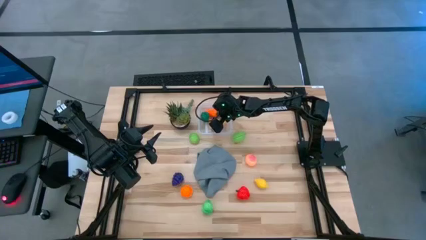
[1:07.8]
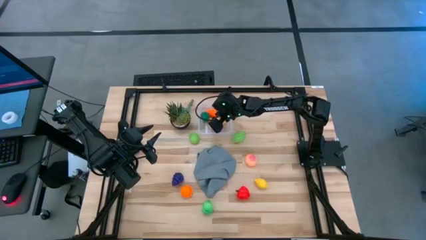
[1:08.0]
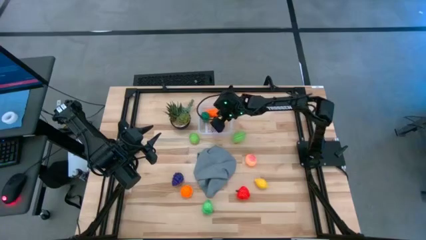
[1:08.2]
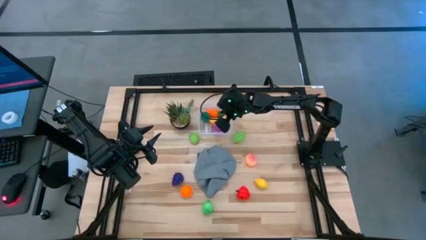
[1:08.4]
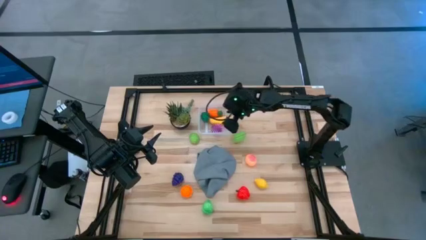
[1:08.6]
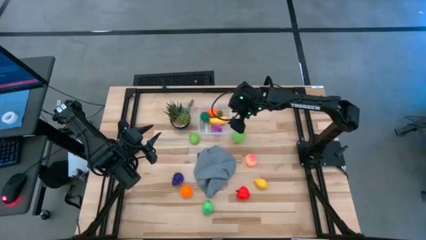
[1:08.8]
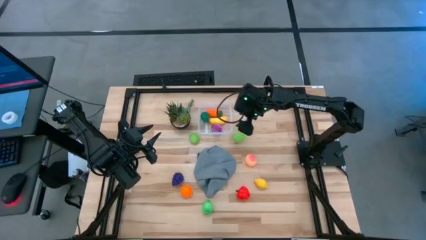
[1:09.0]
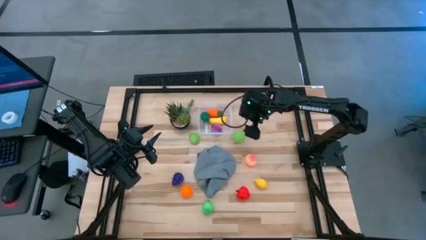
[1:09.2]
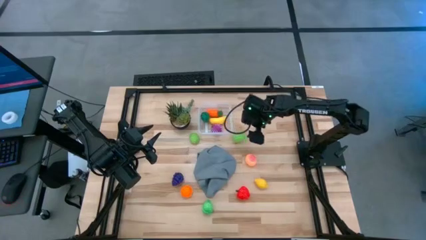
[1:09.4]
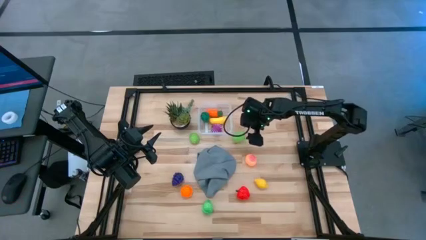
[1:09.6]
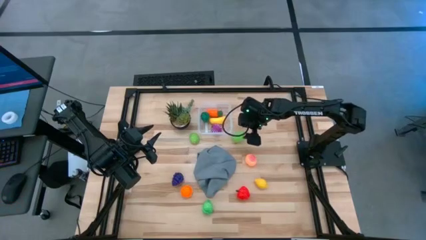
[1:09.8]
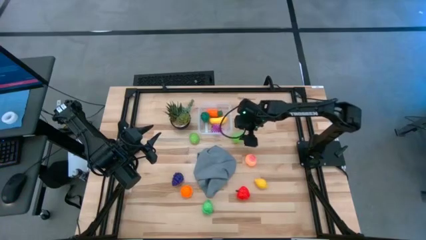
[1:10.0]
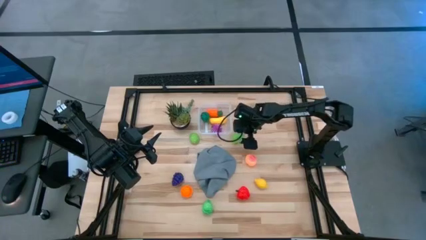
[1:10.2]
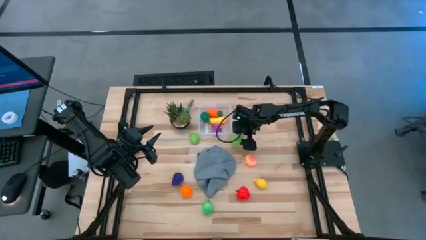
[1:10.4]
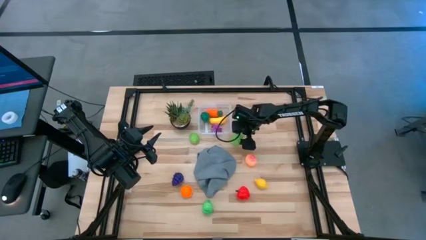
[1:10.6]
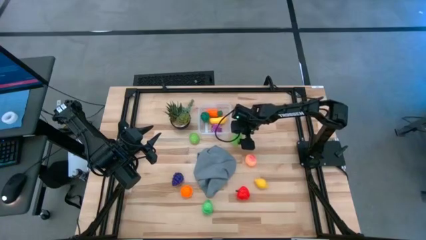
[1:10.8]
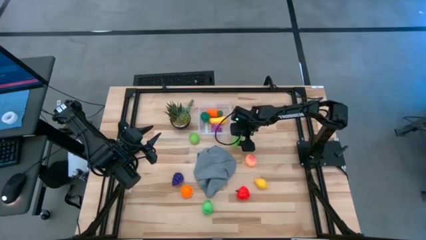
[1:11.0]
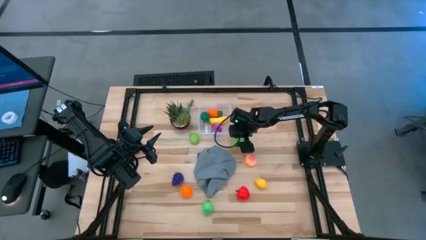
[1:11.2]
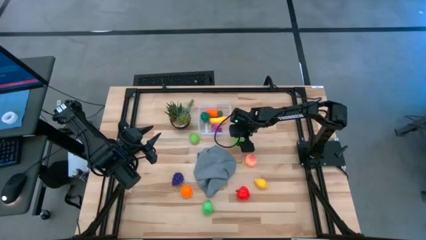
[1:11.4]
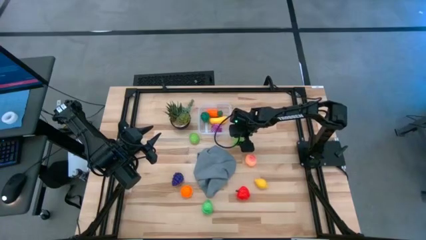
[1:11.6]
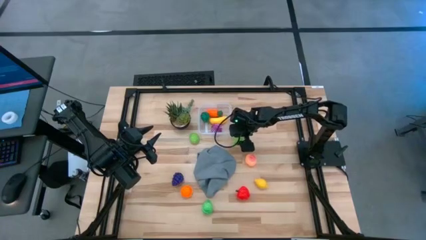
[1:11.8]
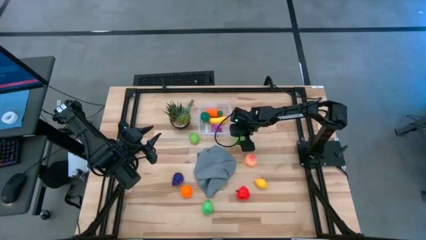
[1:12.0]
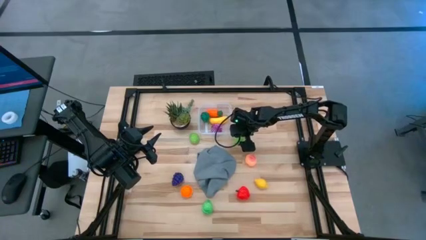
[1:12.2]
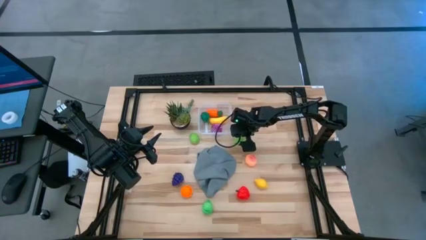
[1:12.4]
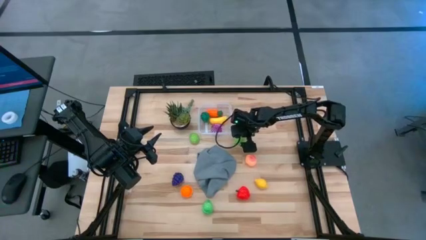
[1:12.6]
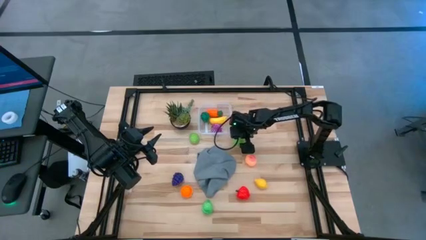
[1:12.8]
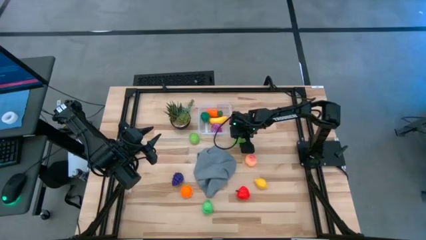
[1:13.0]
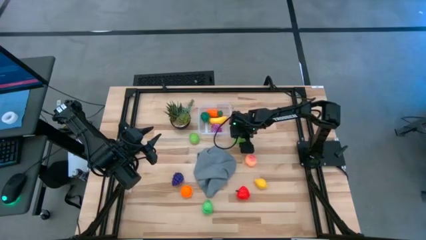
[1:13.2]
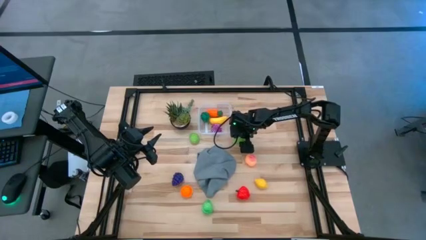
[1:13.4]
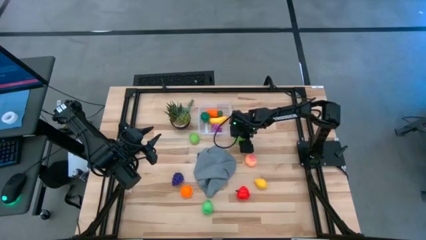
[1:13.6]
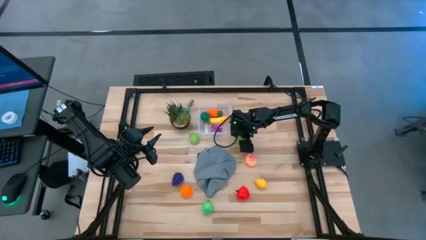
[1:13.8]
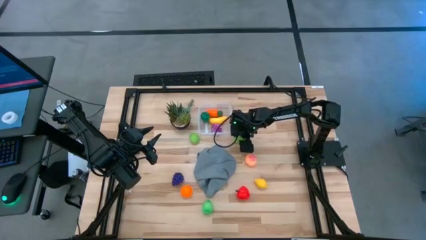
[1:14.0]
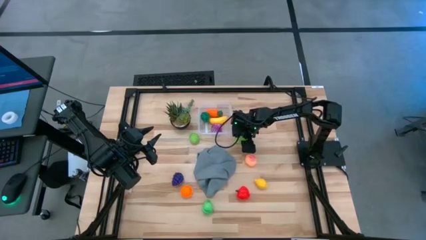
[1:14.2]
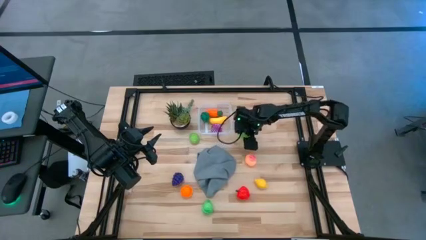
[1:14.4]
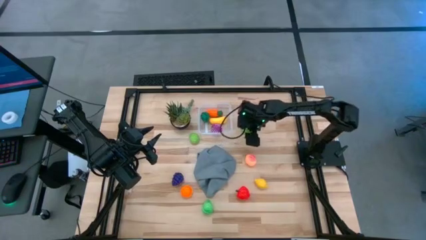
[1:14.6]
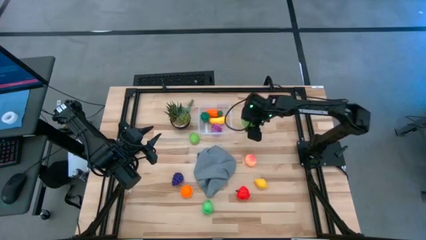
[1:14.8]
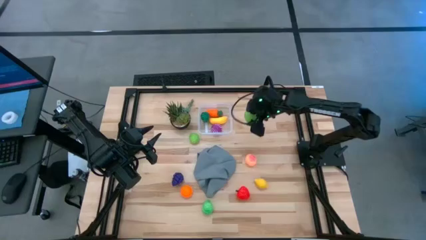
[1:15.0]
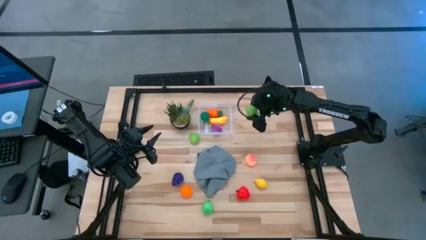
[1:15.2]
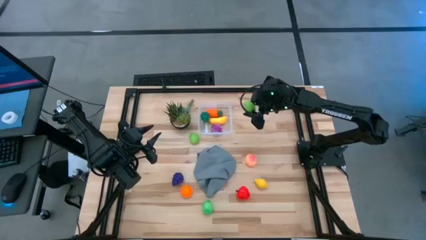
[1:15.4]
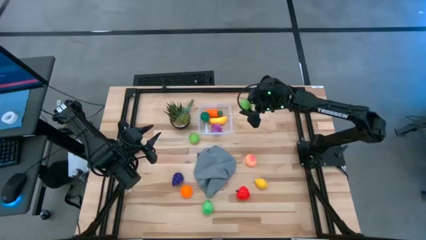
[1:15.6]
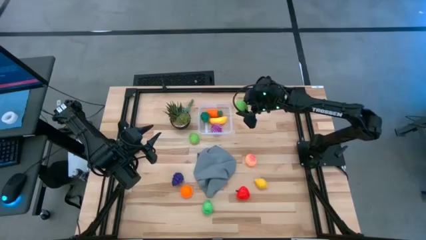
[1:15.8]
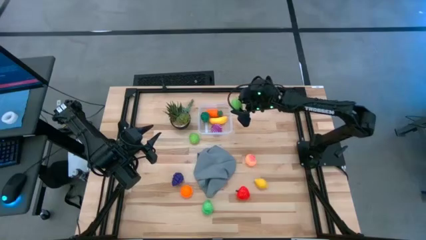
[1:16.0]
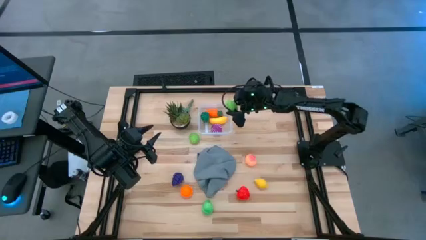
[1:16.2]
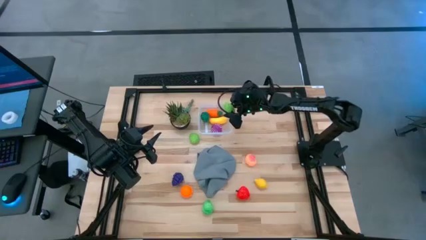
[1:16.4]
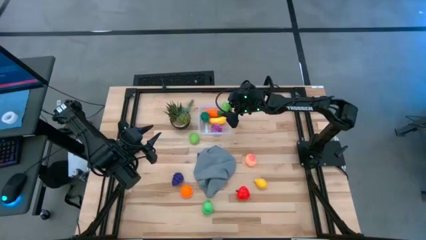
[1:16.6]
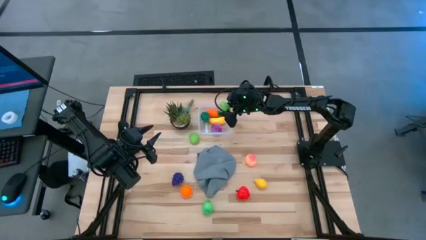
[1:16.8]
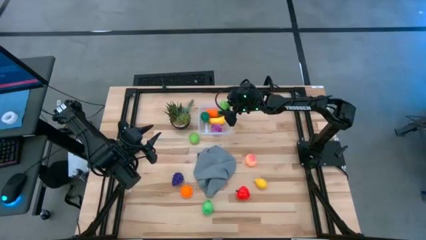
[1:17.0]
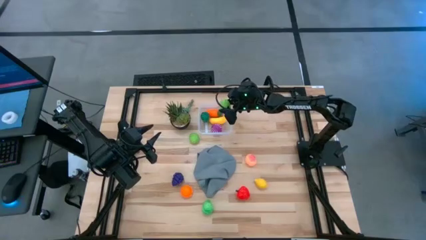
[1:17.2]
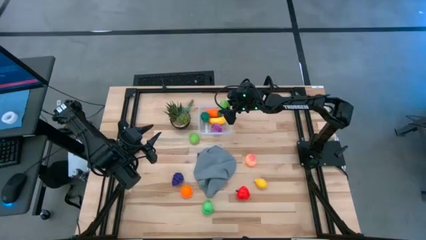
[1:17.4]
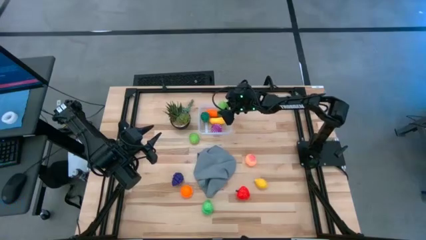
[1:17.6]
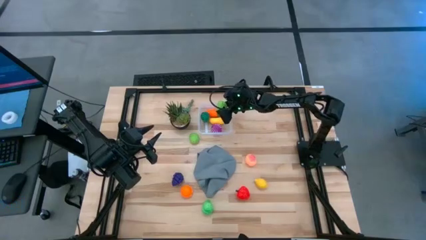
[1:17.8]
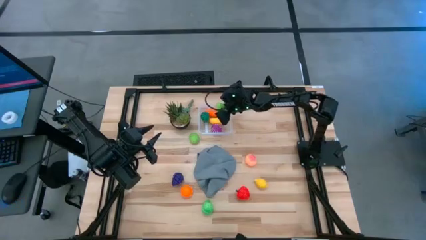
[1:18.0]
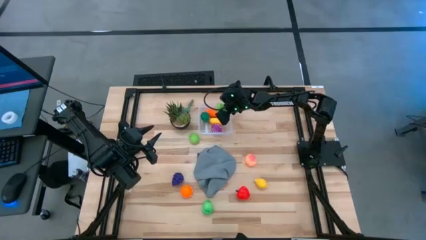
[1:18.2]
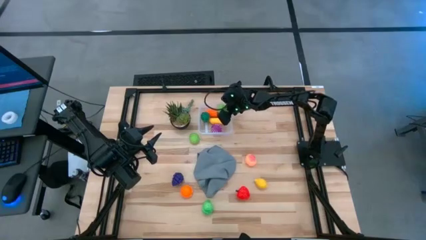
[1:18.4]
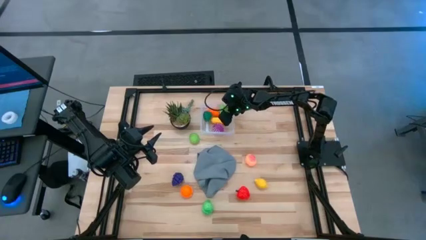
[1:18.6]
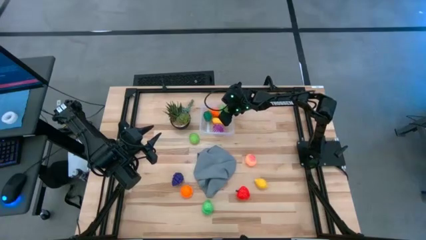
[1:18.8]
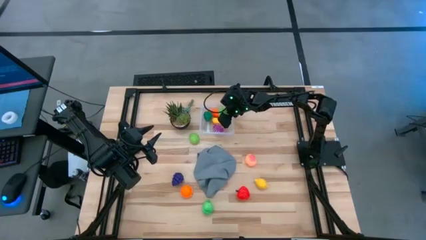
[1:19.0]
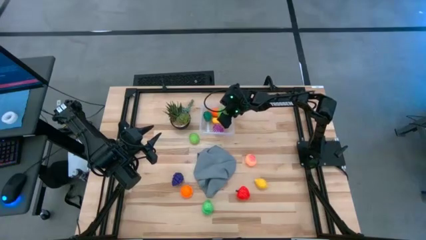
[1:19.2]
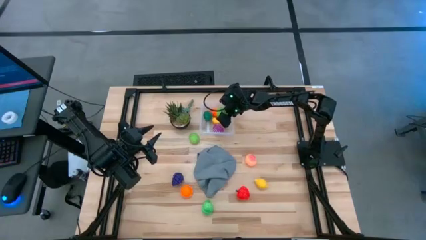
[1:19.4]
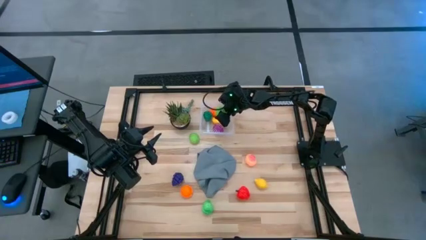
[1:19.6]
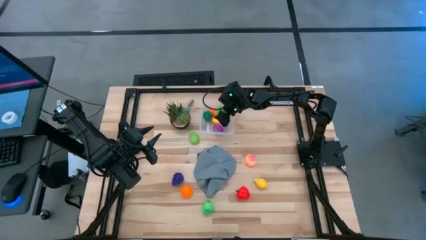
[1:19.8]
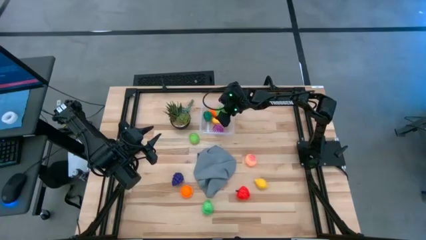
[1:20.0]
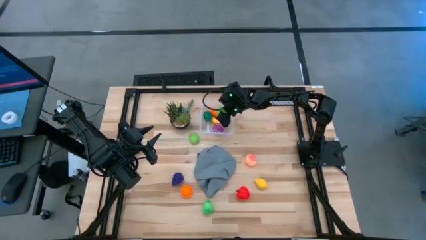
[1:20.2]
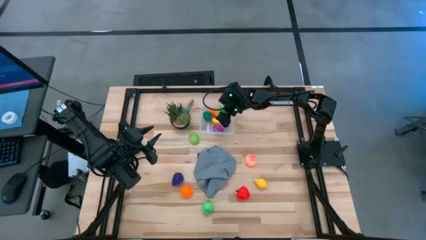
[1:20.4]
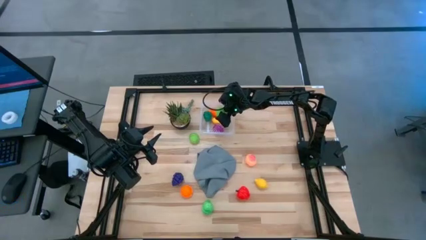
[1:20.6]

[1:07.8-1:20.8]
Task: Pick and placing Produce into tupperware
Put the green melon into the transparent container

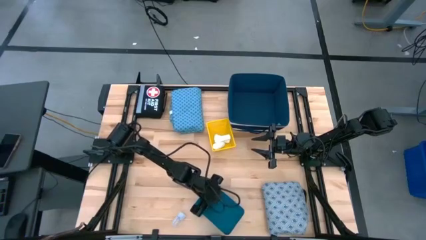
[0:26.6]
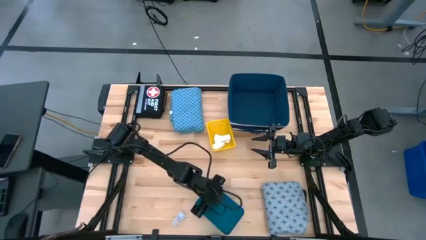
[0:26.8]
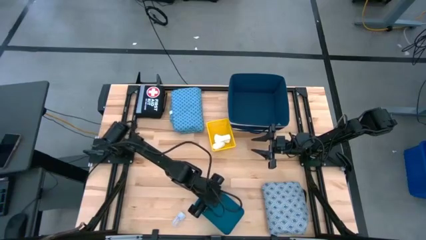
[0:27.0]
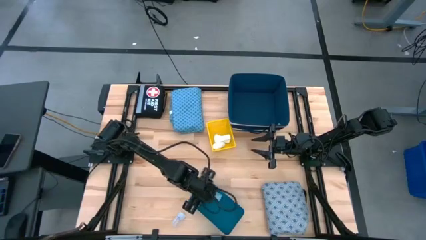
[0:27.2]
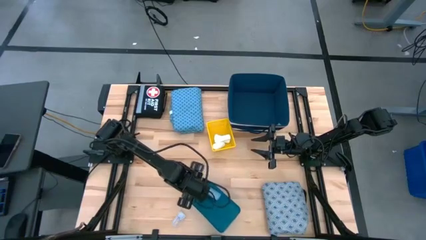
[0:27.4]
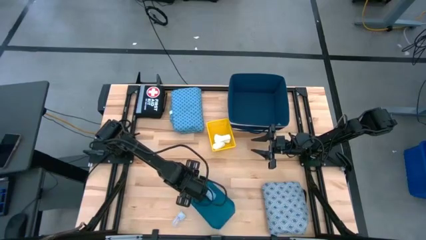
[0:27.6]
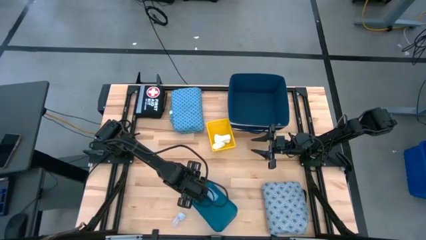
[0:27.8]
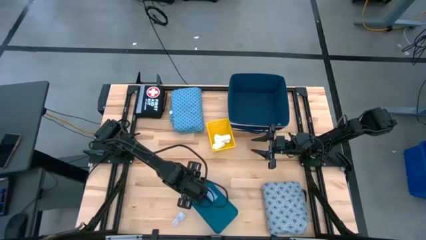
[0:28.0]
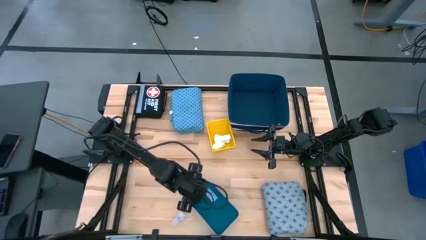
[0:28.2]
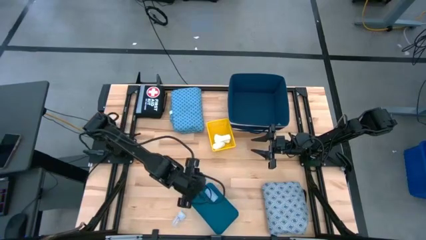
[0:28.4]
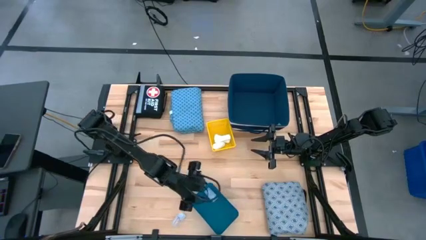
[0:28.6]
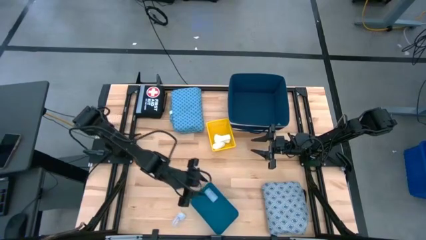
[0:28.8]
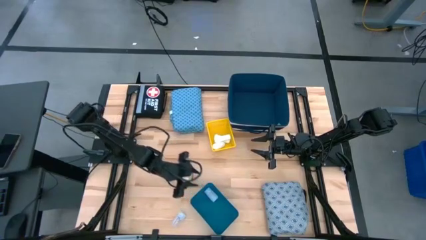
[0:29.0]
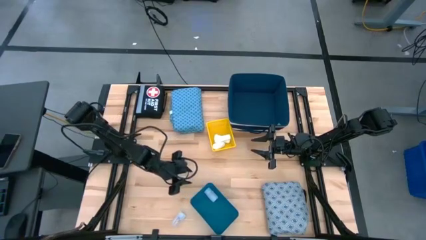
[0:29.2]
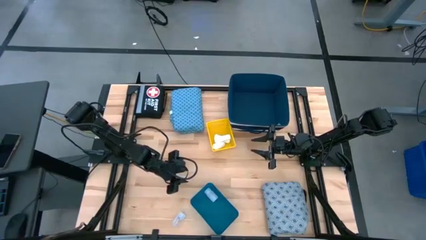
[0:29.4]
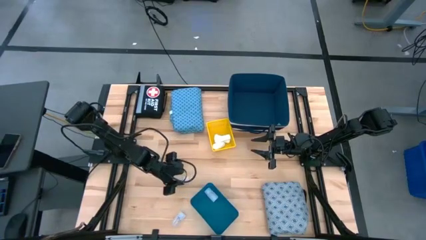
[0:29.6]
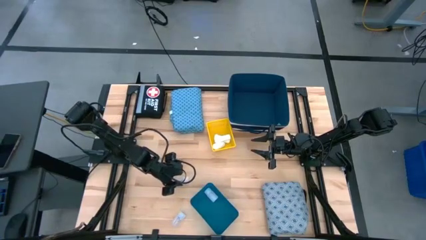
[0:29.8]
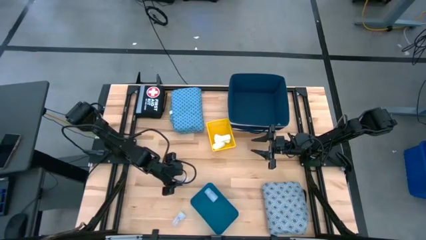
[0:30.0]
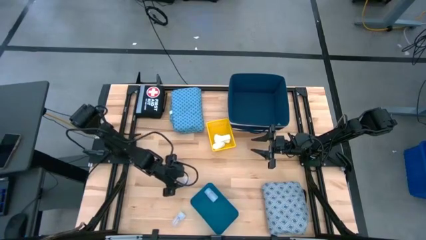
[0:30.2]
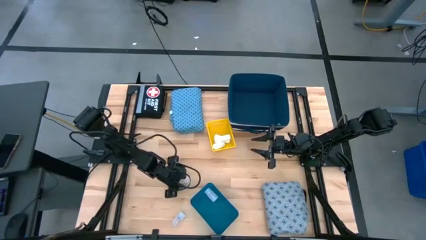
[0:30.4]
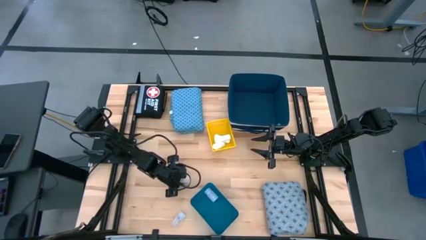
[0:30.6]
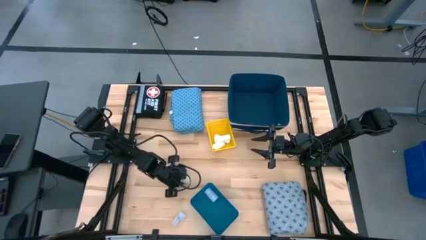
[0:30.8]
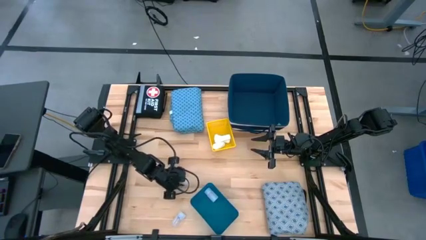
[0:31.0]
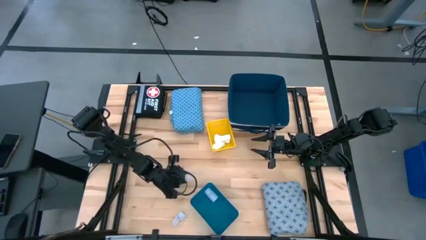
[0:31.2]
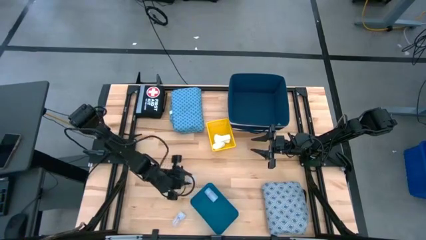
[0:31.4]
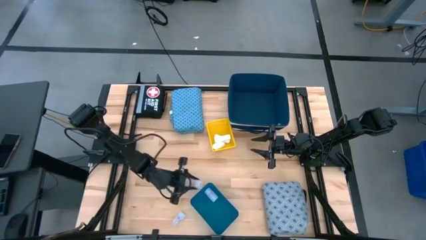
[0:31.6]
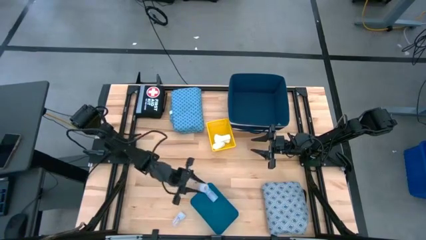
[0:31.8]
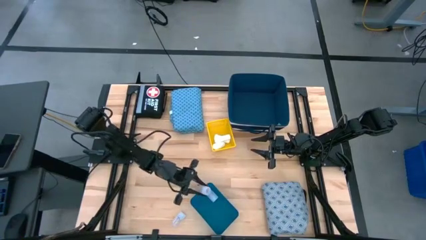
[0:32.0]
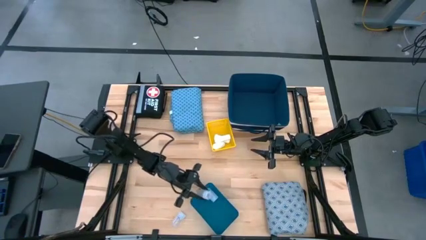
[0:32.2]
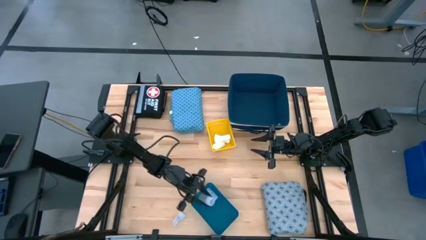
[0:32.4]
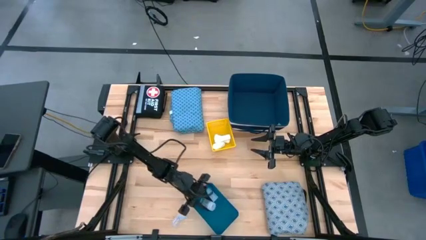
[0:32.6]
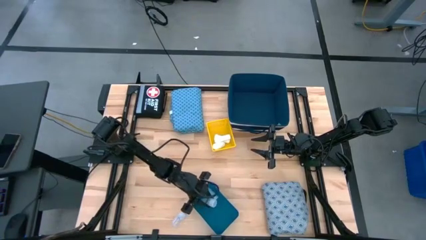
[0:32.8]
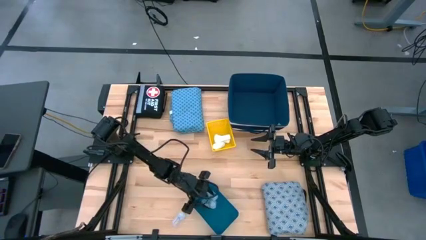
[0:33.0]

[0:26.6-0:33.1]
Task: Pick & place medical supplies in basket/bin
Put the top transparent medicine bottle into the blue bin
